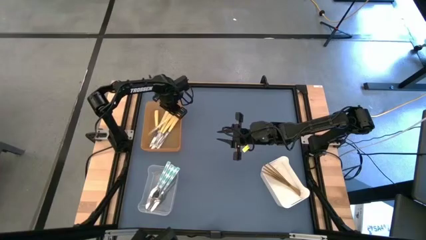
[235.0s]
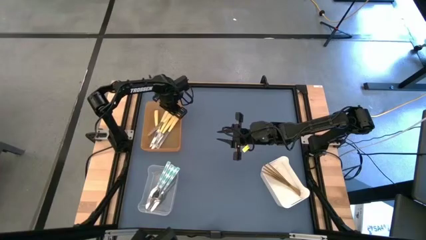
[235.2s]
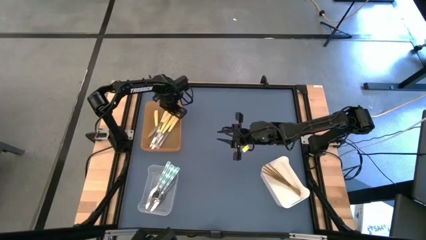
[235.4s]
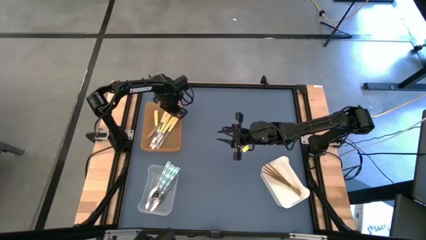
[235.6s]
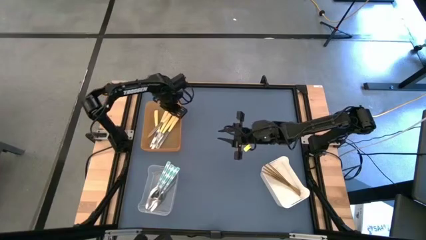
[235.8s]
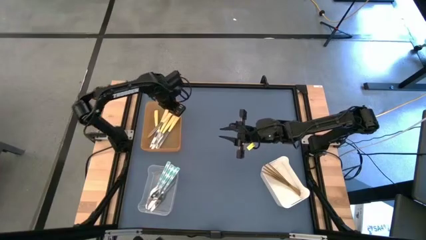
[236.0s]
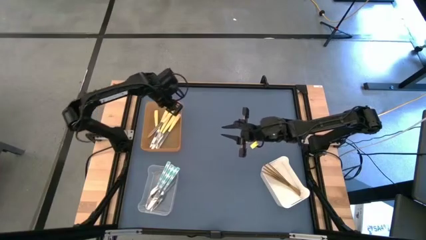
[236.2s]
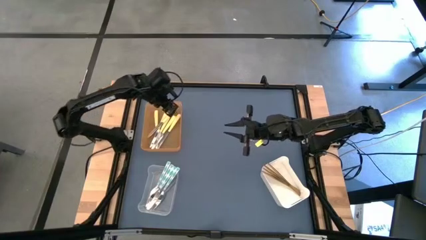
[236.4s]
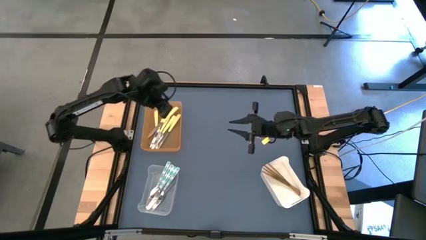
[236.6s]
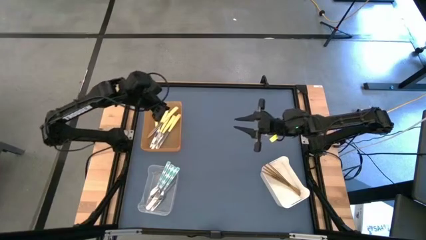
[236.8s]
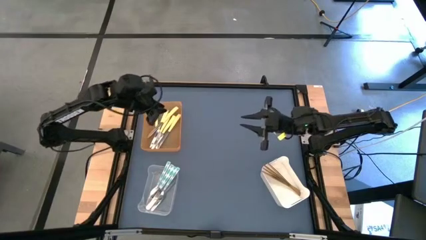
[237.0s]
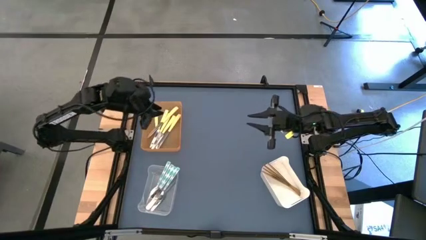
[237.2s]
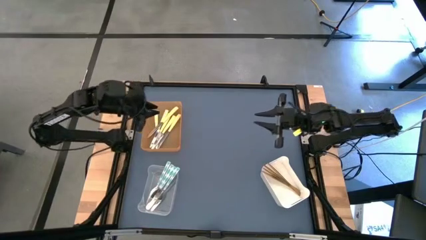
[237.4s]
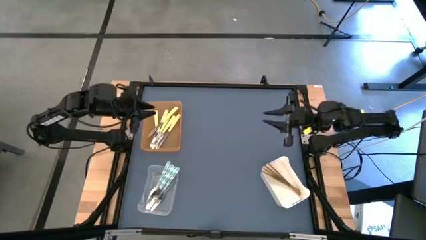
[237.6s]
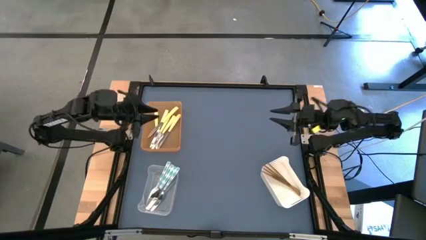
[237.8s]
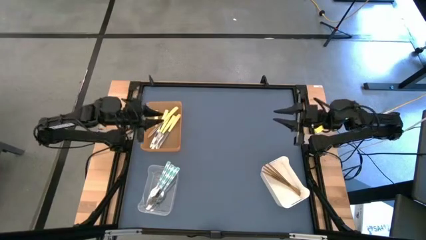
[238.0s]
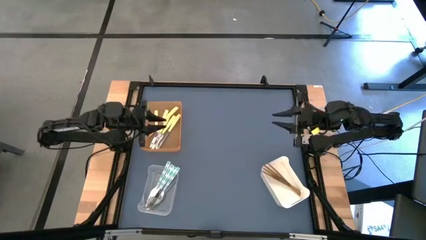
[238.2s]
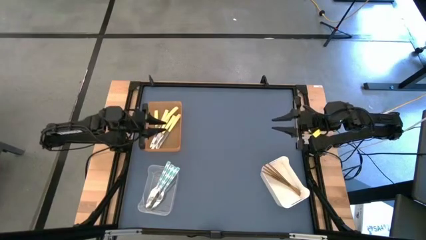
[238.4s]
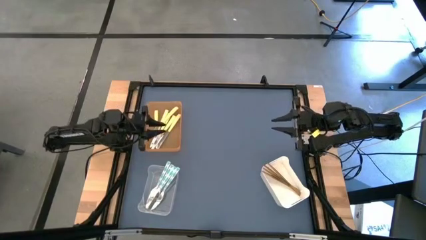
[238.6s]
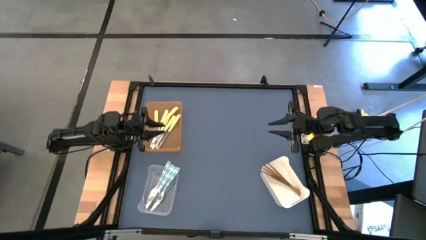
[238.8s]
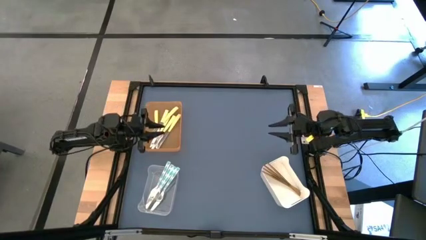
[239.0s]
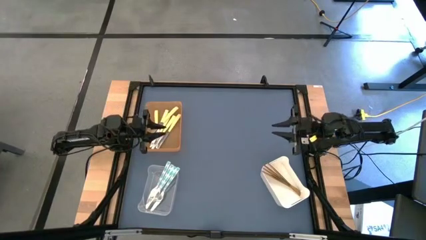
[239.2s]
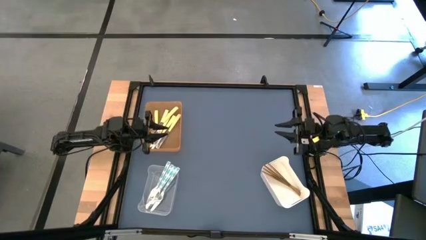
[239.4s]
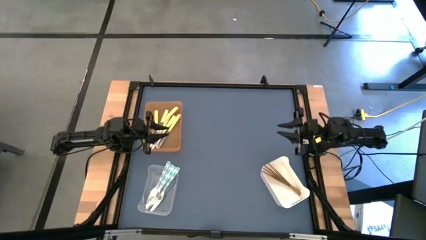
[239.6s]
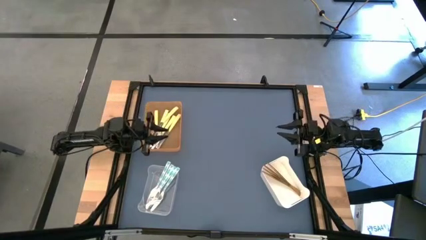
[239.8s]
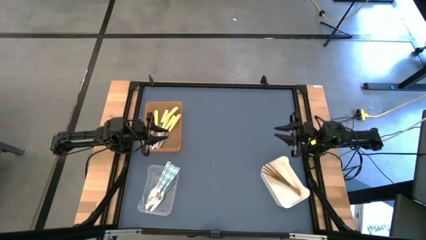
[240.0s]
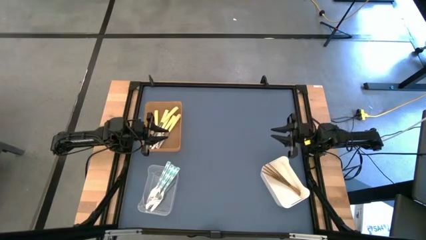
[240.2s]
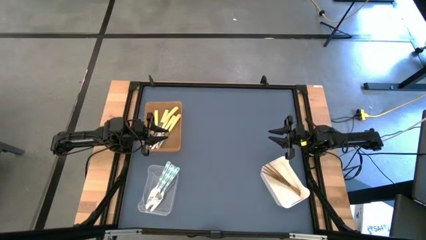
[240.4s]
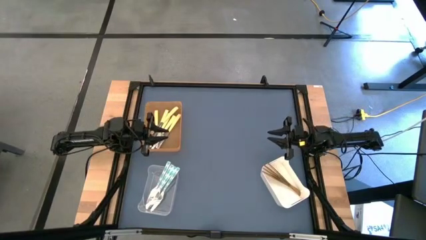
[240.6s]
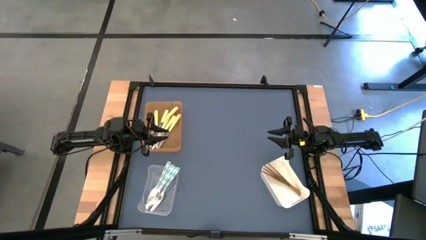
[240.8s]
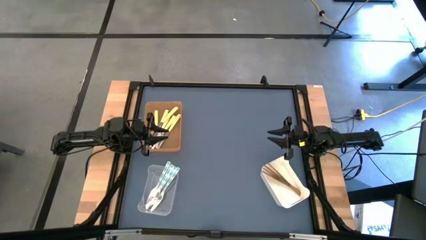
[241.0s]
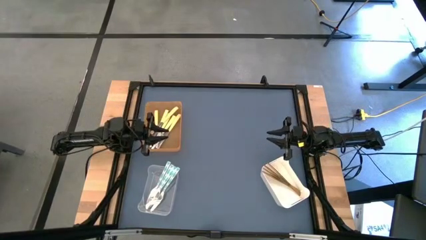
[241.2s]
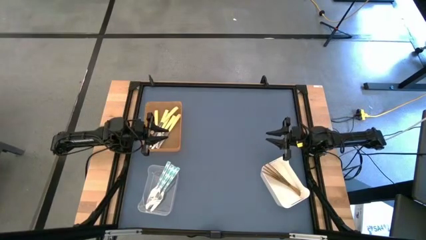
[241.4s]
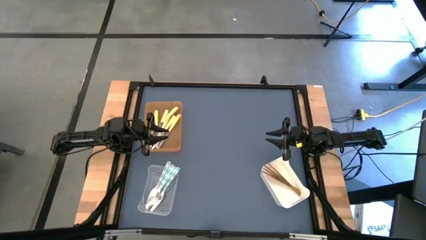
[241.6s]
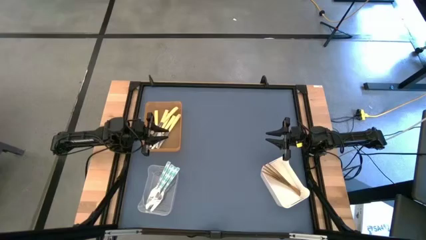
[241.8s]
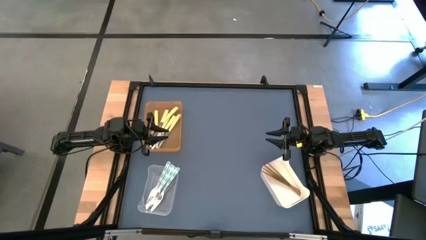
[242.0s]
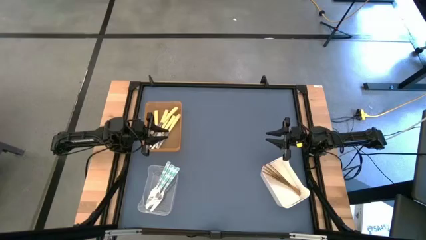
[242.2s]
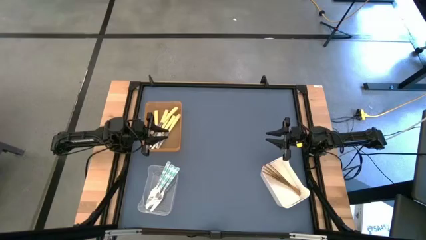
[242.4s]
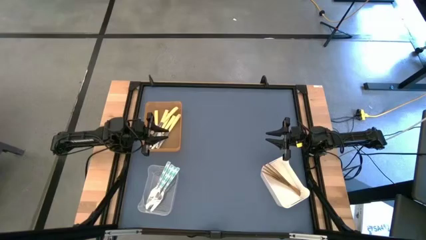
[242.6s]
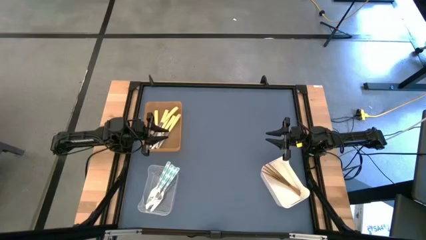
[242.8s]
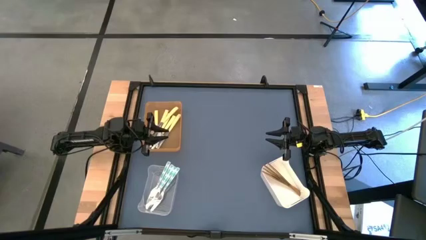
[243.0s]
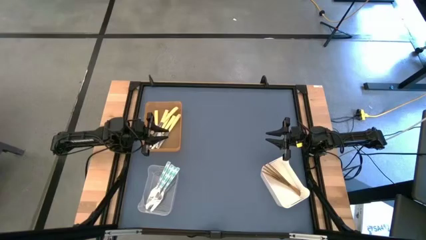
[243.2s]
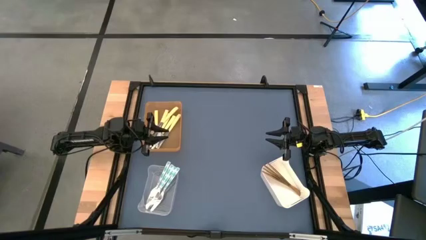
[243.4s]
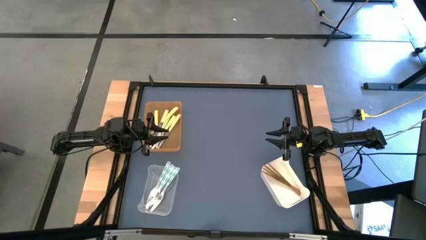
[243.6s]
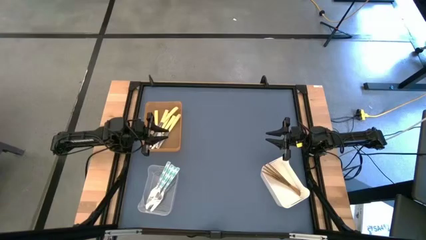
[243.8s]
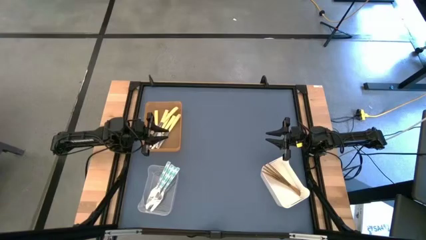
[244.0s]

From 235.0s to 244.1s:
Task: Sort silverware by color (type)
Return to Home Position

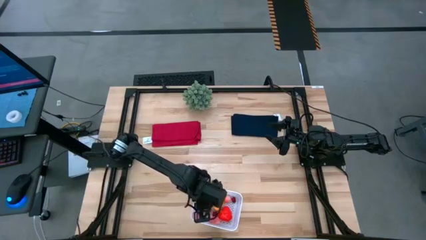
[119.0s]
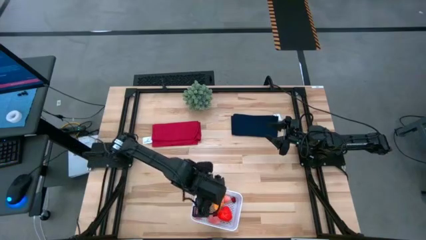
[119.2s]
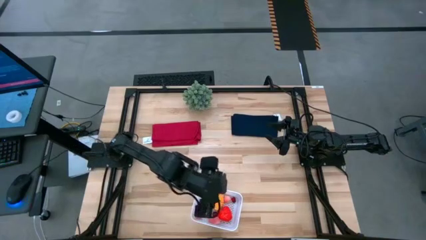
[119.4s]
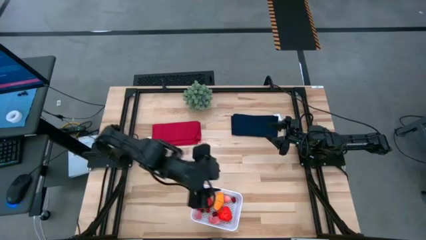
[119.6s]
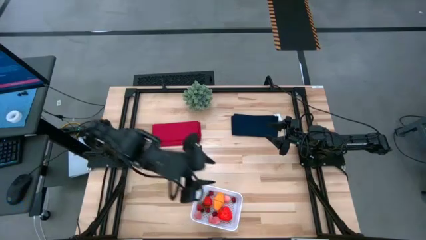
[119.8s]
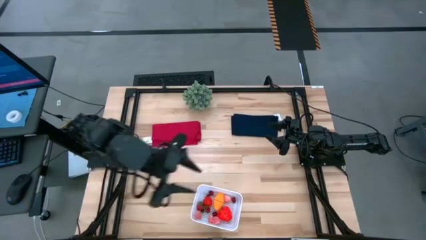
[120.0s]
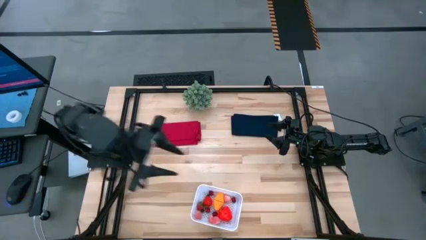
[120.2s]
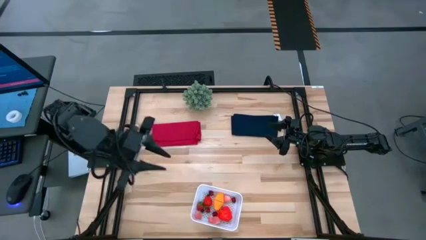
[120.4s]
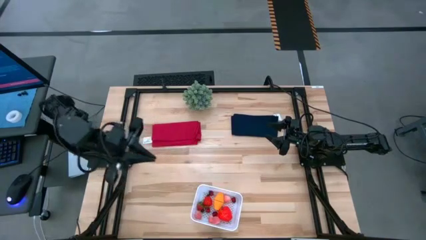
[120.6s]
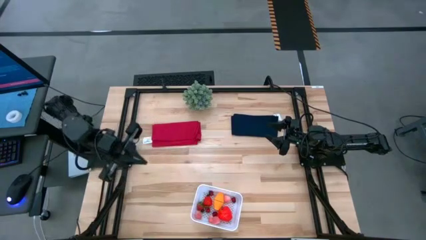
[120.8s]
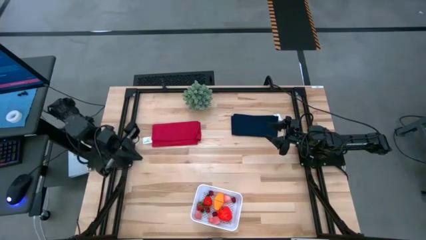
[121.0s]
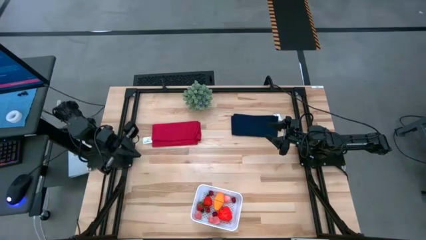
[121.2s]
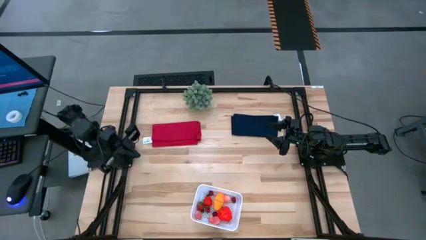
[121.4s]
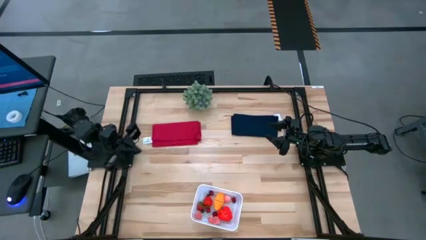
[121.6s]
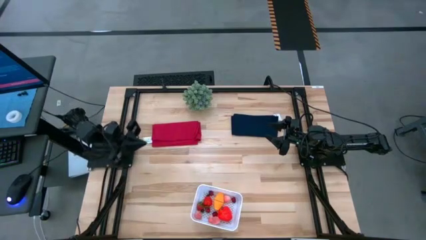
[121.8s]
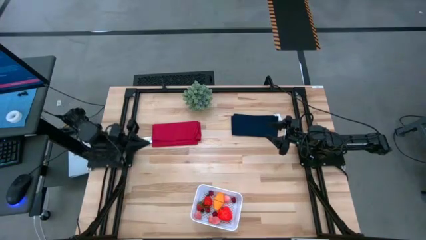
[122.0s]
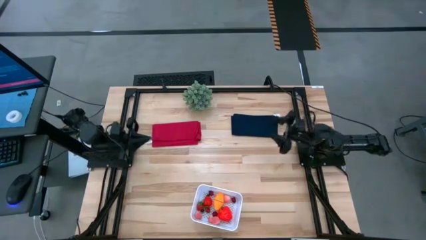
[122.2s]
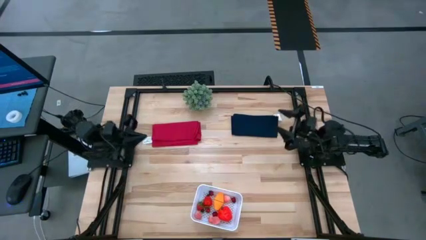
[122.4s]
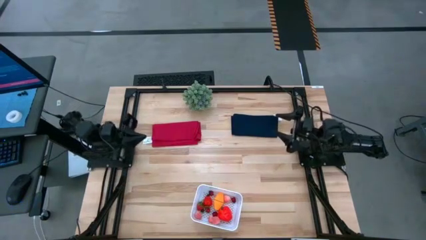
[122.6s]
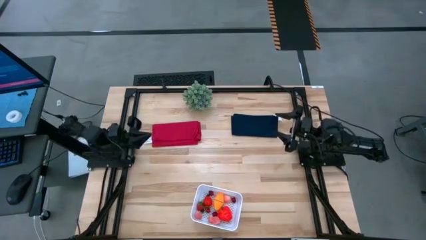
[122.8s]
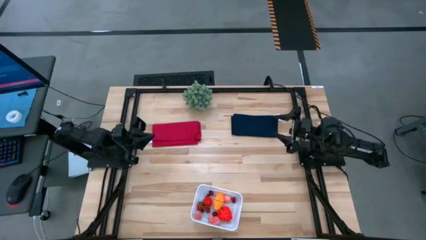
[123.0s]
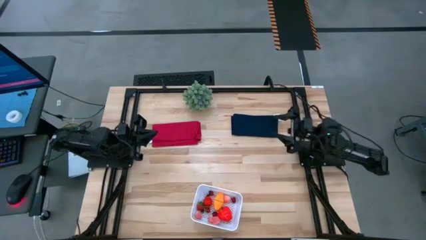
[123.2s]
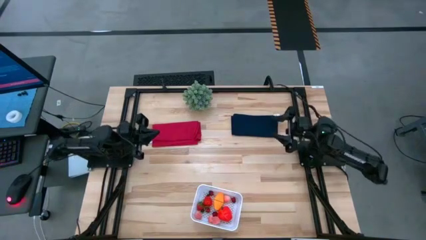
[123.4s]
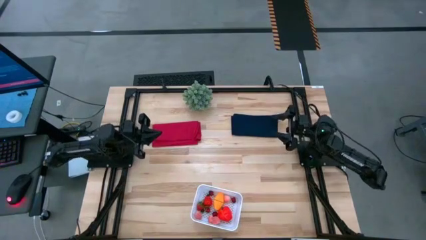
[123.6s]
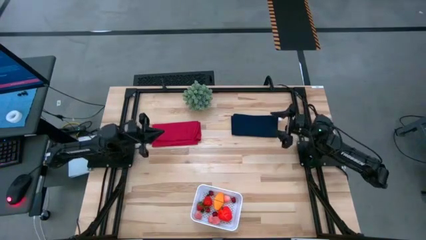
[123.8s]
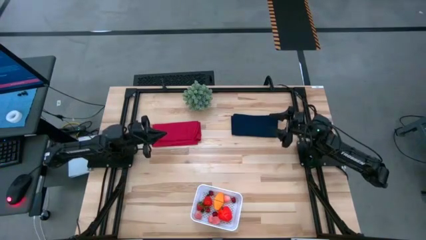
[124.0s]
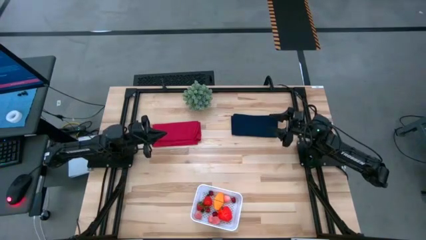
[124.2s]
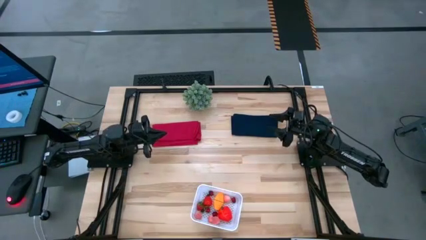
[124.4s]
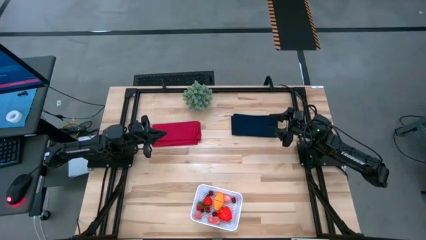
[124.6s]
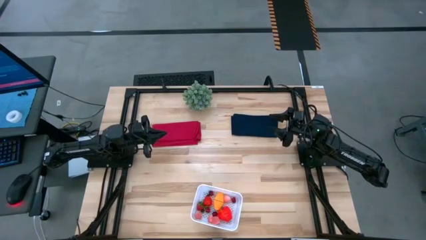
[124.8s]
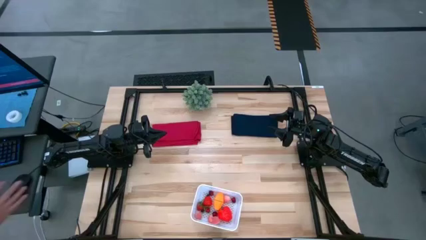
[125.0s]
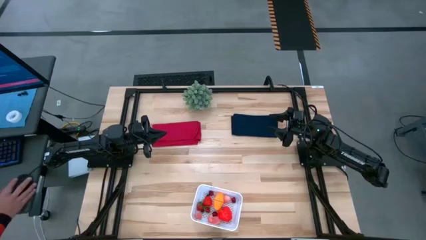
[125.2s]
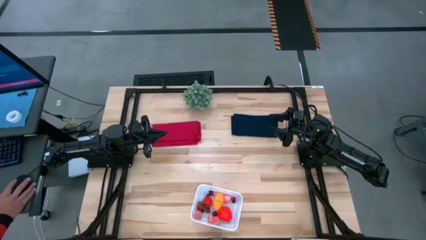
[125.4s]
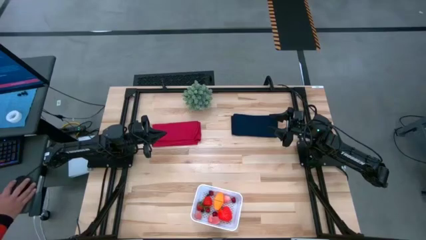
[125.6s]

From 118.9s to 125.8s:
Task: Pick and placing Produce into tupperware
Return to home position
